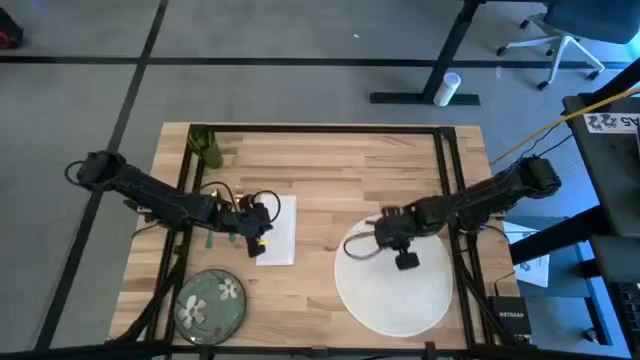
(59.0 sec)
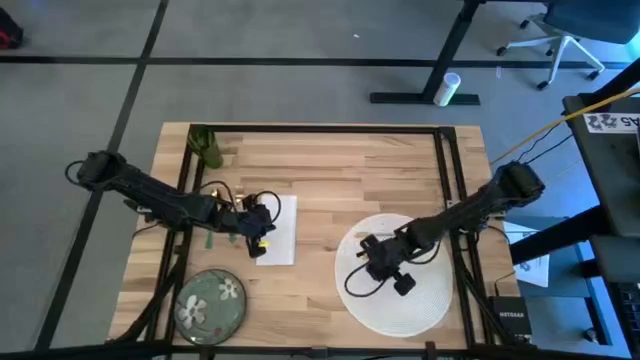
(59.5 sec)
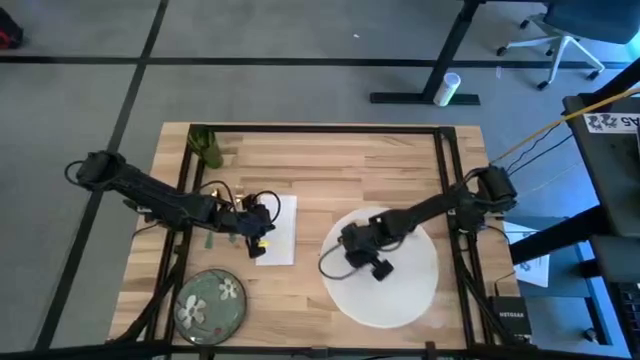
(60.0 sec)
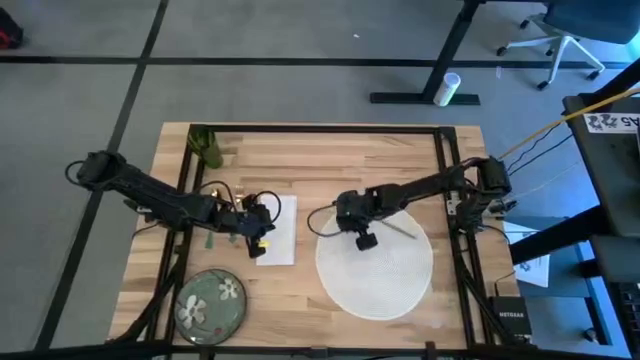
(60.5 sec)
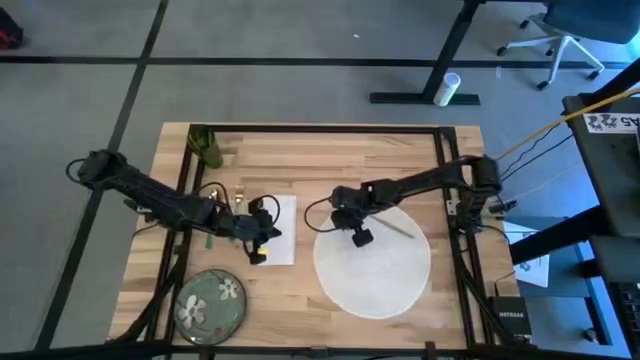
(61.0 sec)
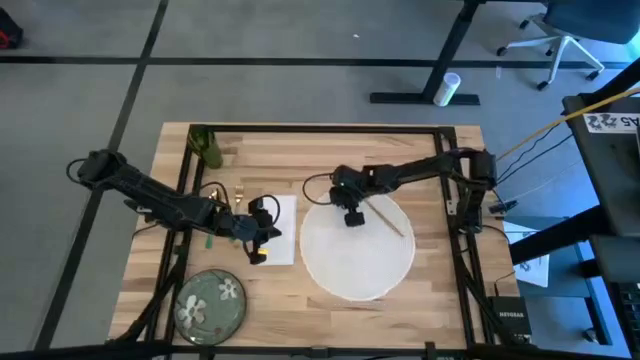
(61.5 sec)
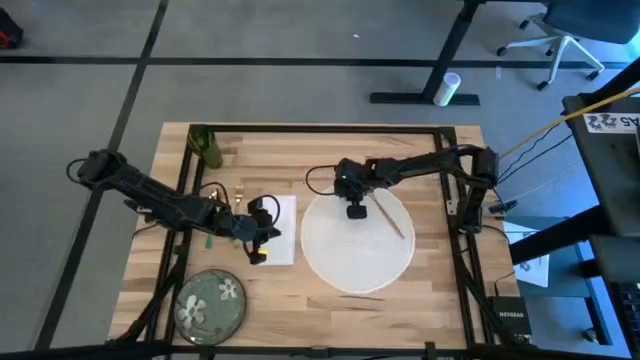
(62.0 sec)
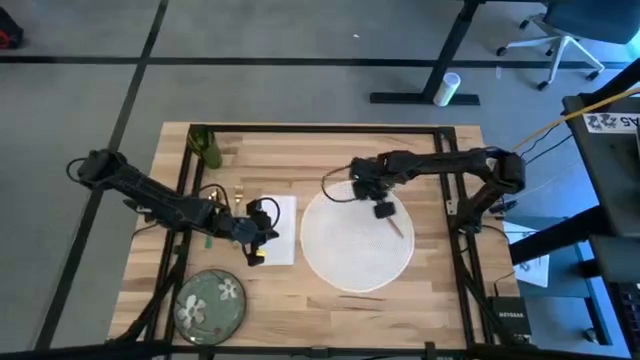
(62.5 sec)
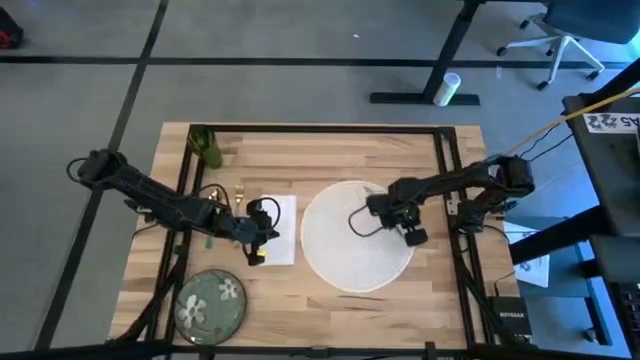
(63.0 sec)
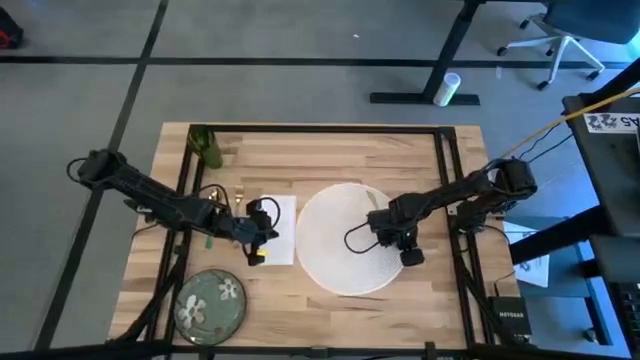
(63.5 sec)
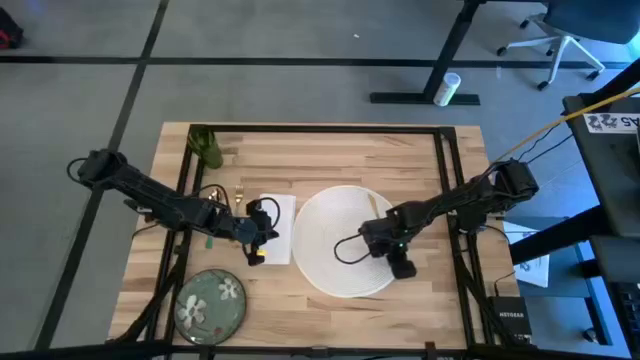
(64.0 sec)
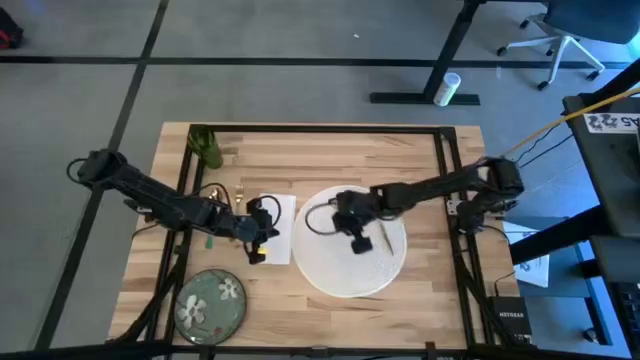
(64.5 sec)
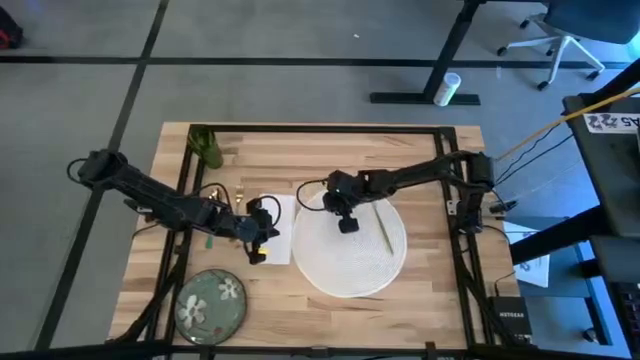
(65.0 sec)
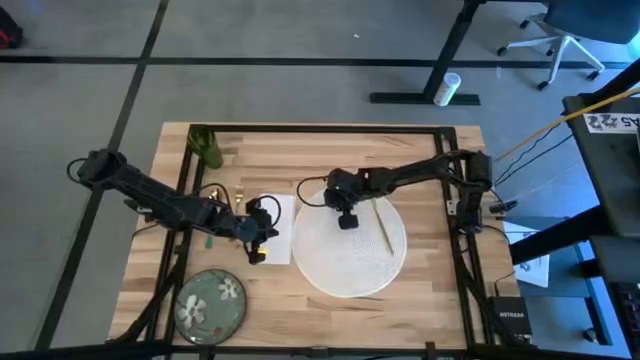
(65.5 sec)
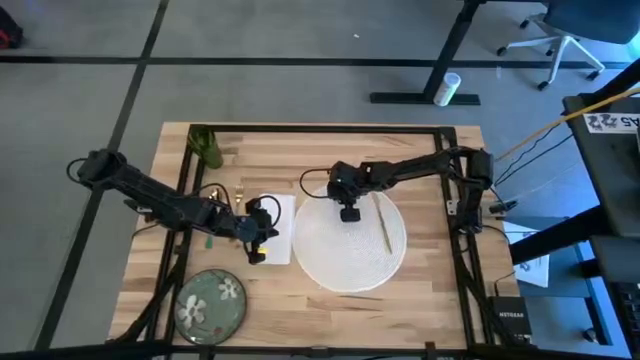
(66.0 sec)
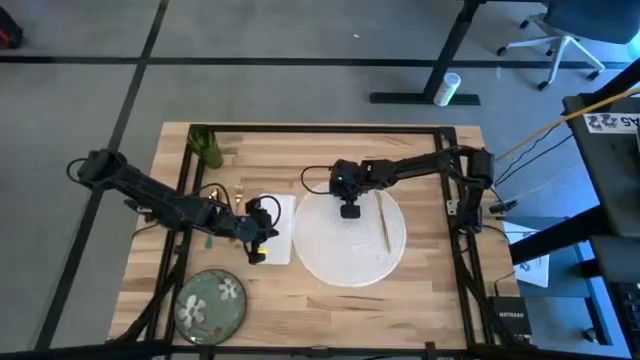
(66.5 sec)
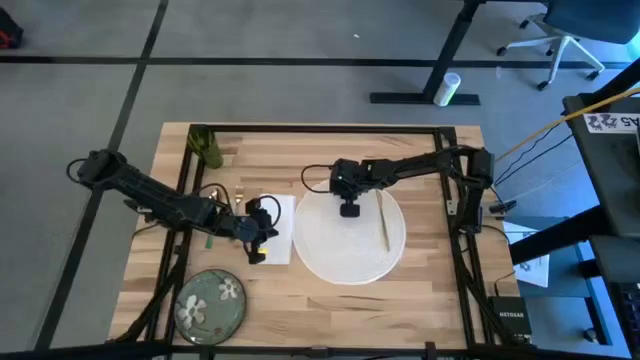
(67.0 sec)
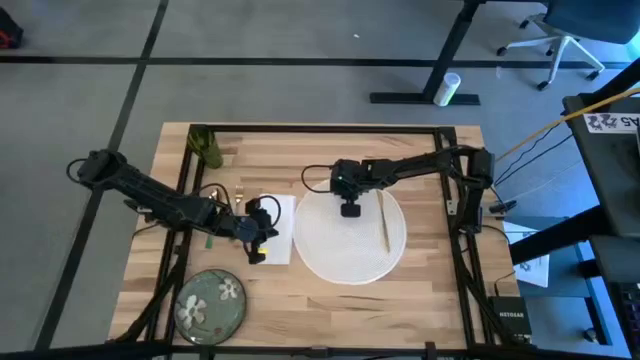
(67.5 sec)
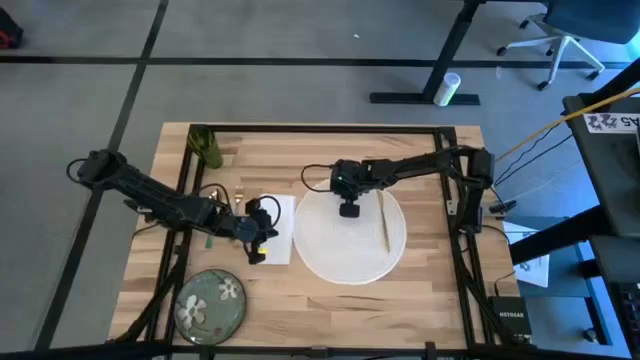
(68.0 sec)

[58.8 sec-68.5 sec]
Task: Set table place
Move the white table mat to the center of the table

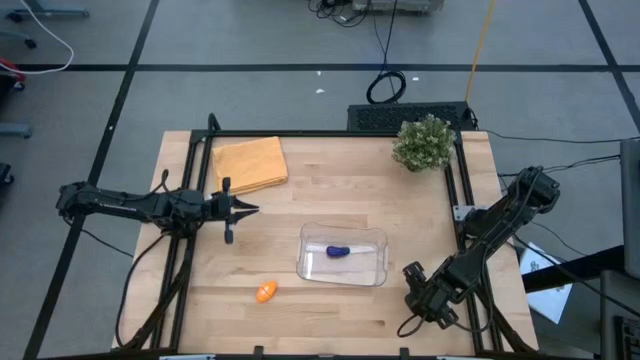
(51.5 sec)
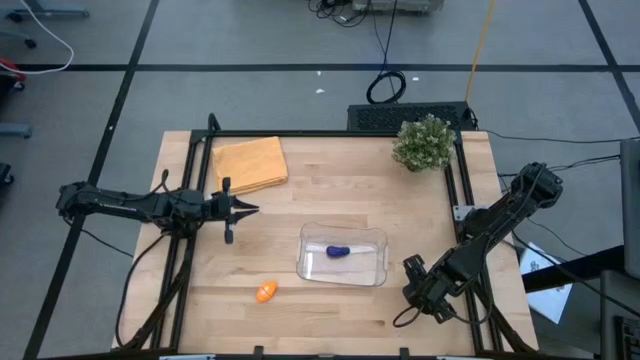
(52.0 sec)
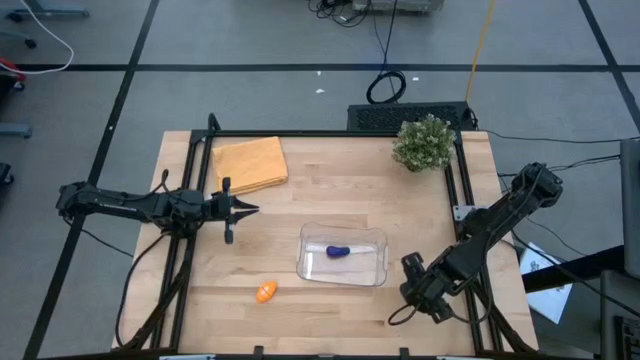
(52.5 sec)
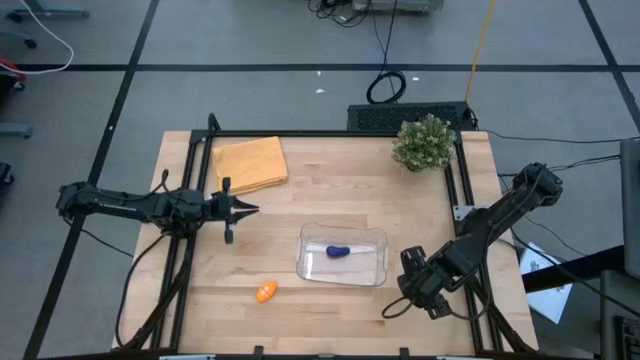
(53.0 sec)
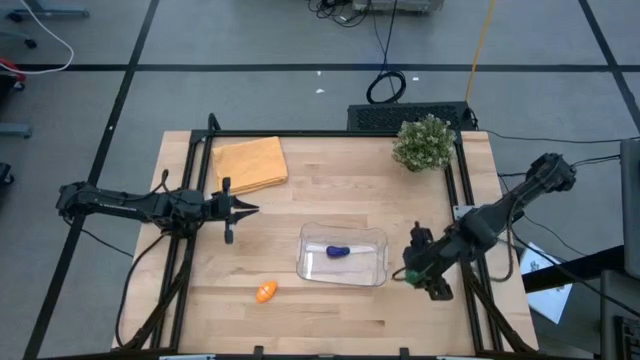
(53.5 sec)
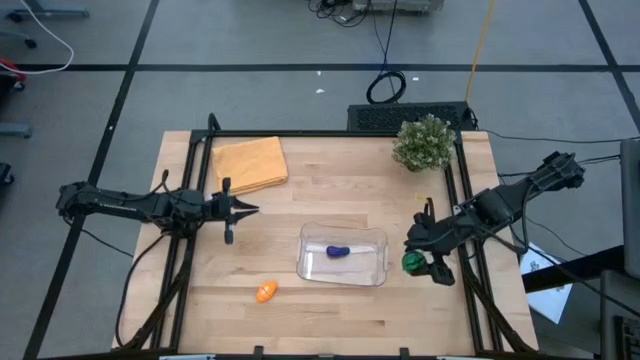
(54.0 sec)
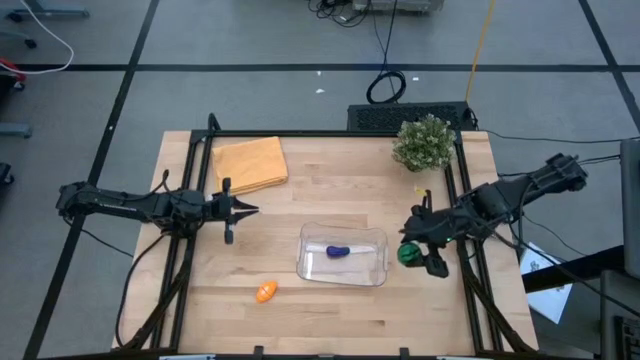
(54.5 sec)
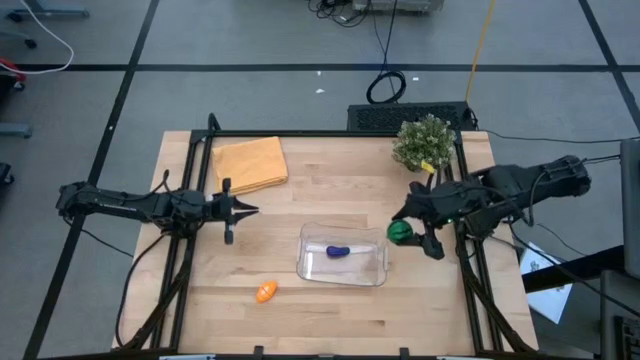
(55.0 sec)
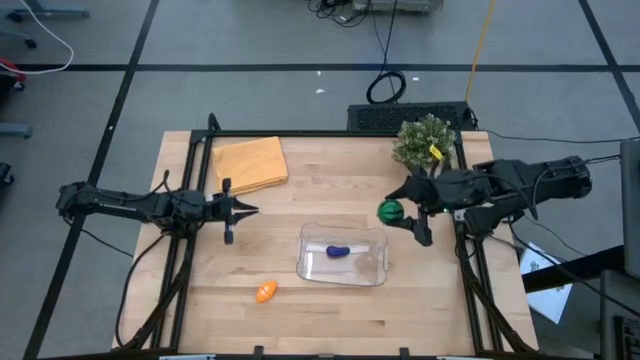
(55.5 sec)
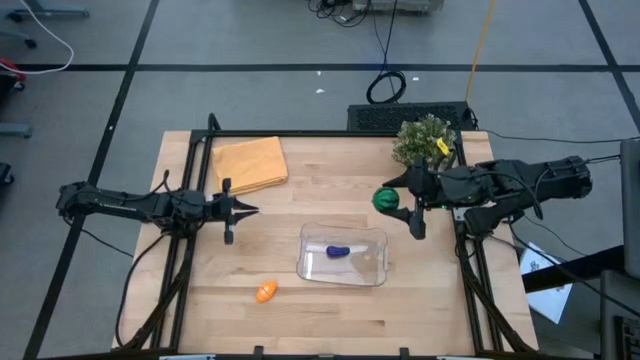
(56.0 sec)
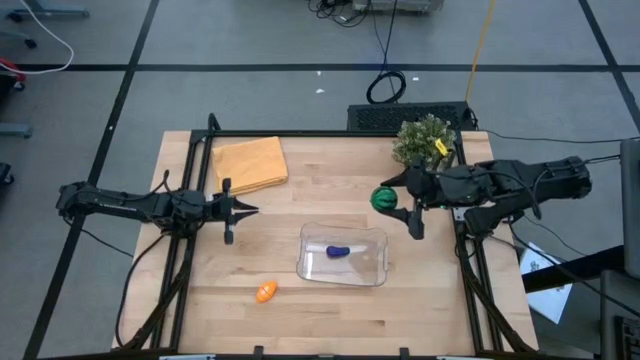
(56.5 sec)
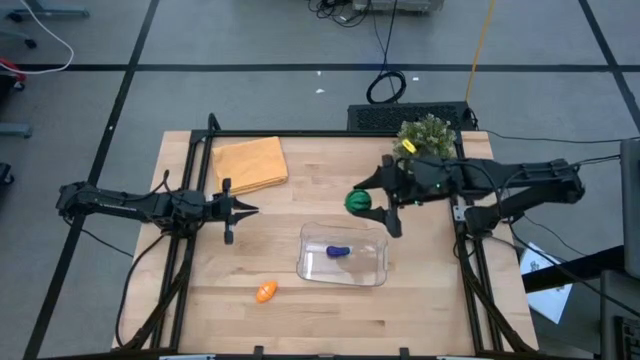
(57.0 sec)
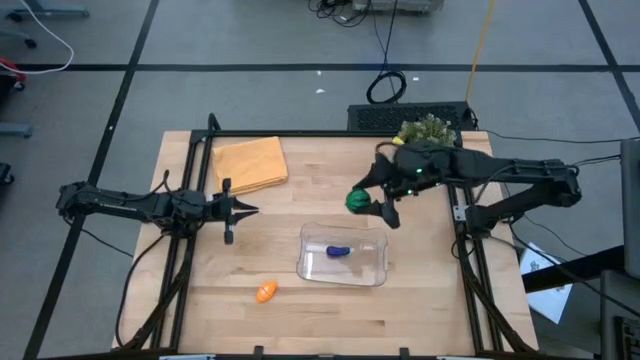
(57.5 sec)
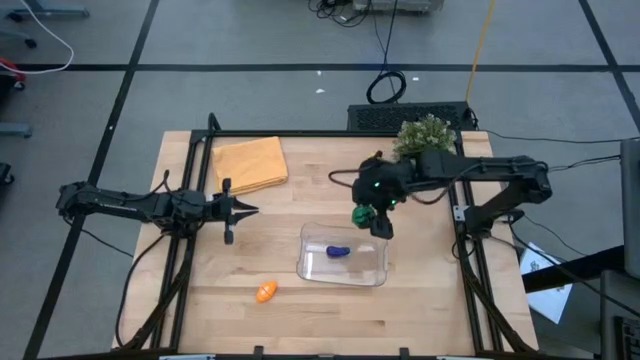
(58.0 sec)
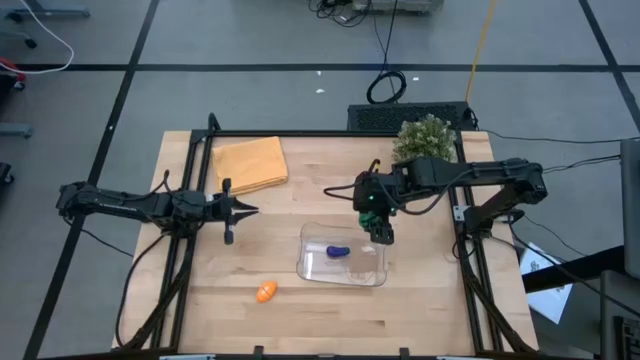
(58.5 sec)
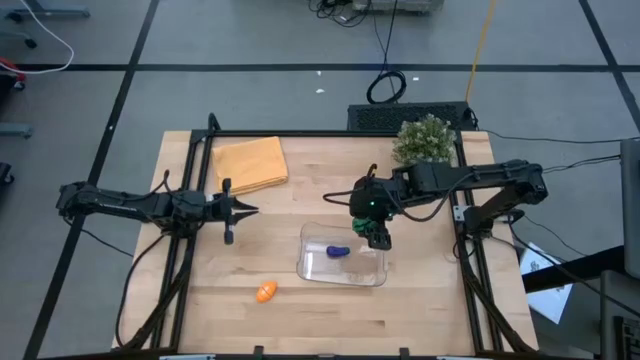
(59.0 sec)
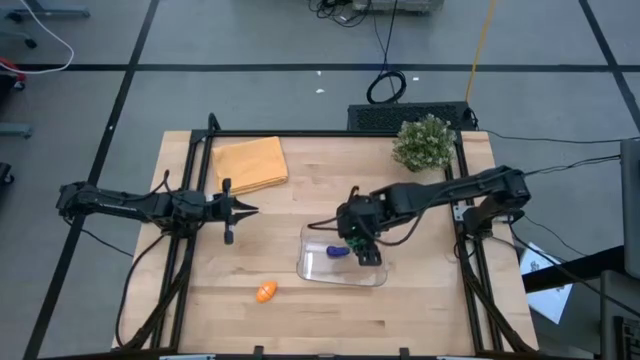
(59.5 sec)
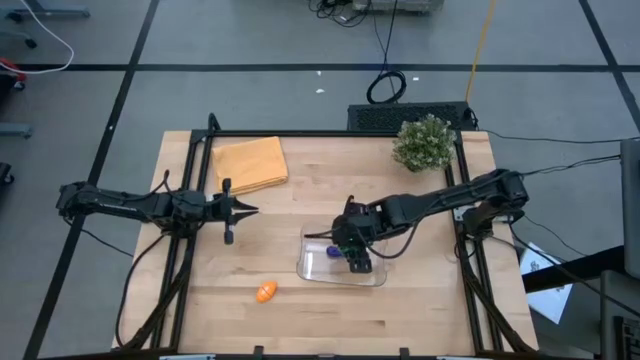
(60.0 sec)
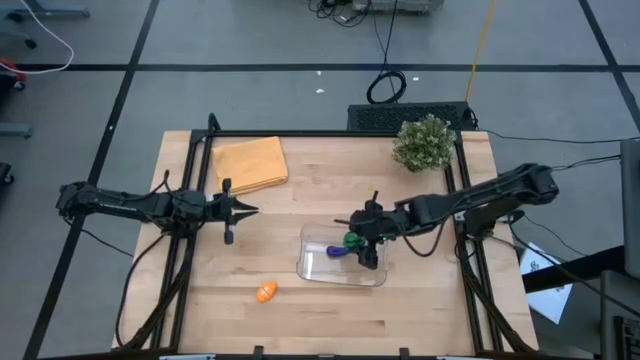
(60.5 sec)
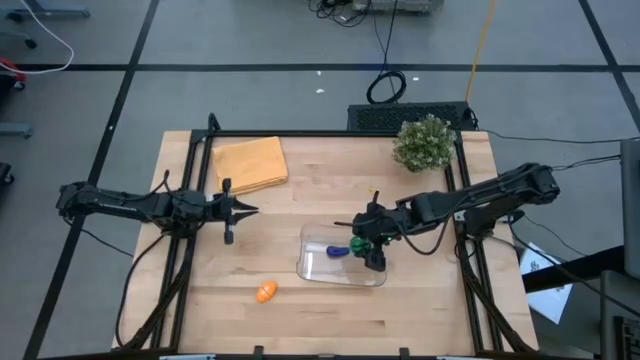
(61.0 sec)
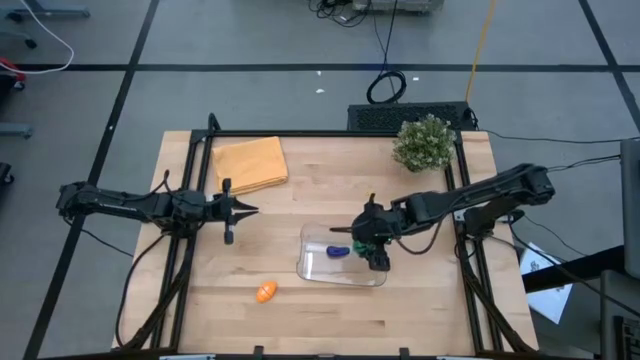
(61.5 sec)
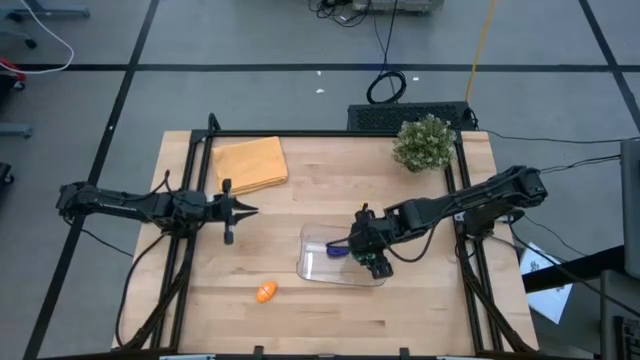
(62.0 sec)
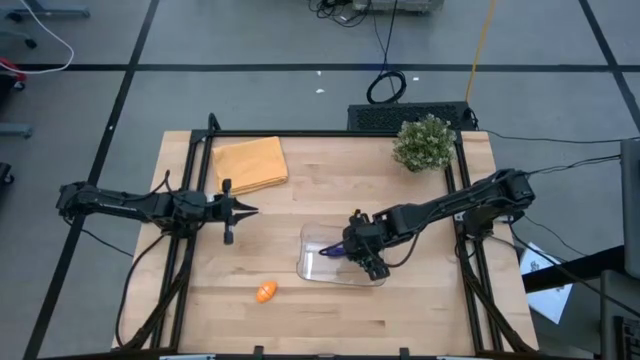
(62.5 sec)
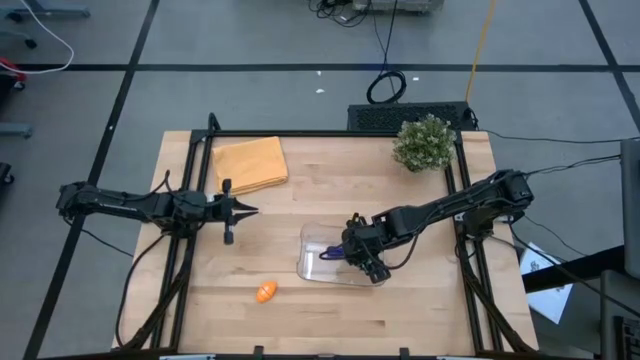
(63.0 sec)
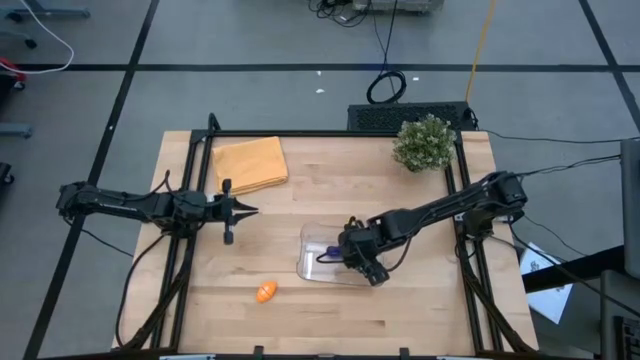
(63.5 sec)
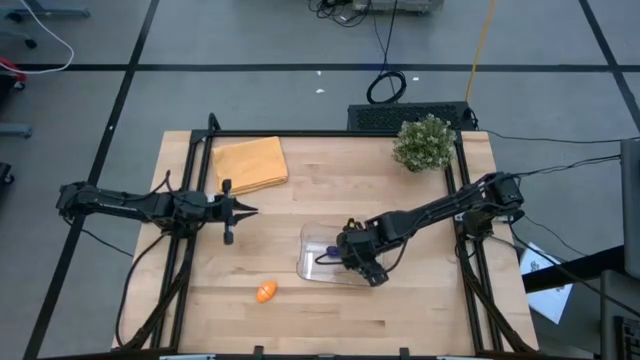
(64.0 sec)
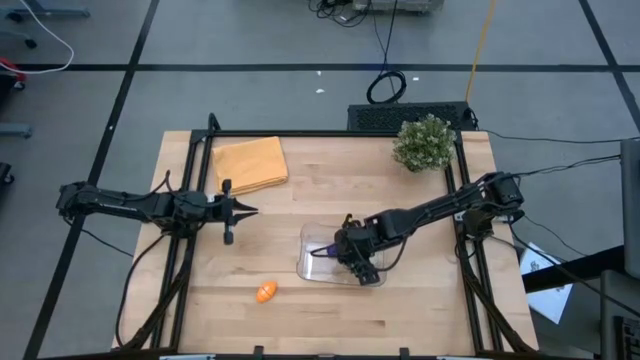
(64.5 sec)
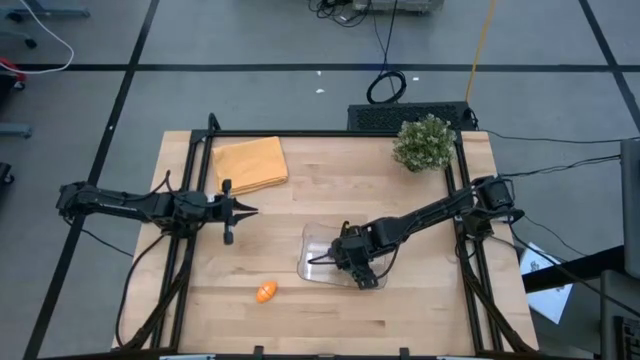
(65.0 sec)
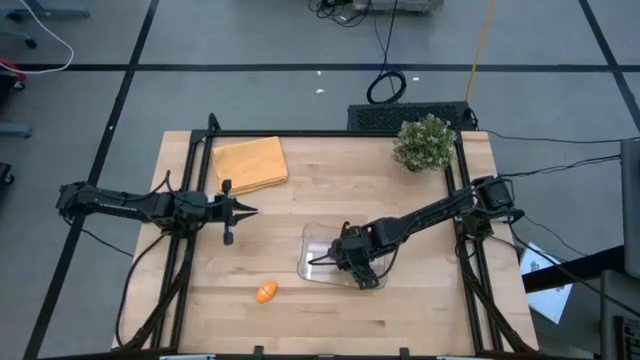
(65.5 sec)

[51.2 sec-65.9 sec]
Task: Pick and placing Produce into tupperware
Put the green watermelon into the transparent bin
